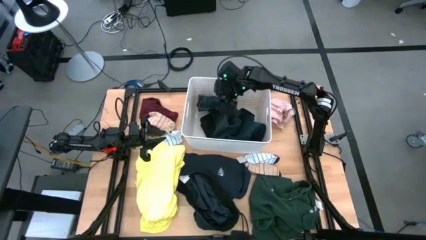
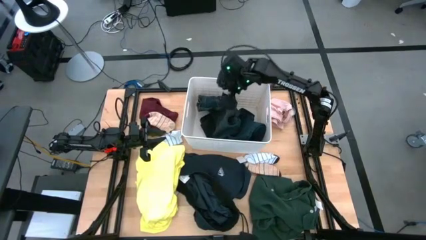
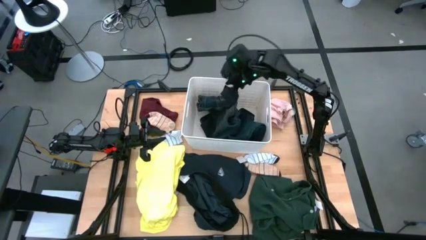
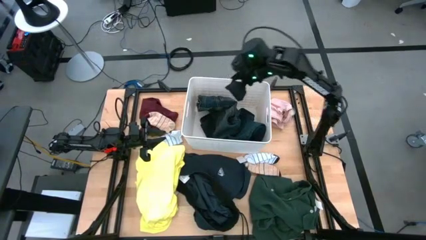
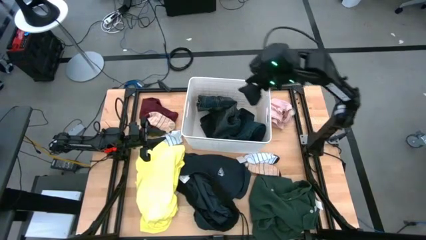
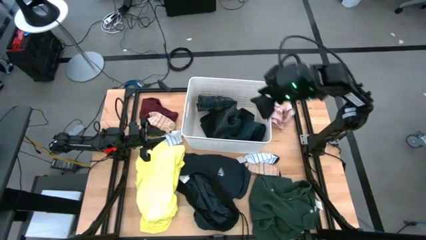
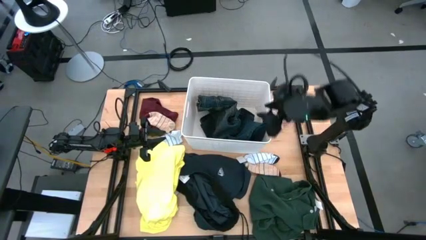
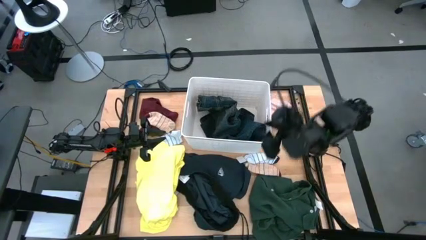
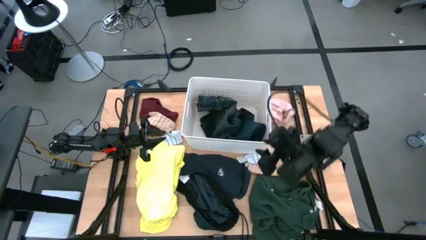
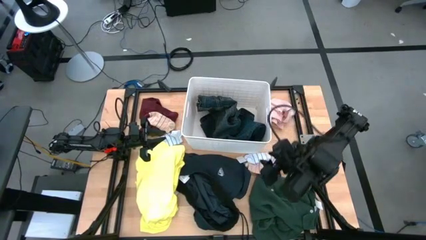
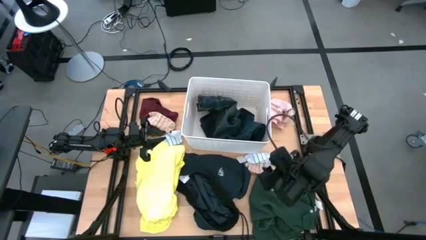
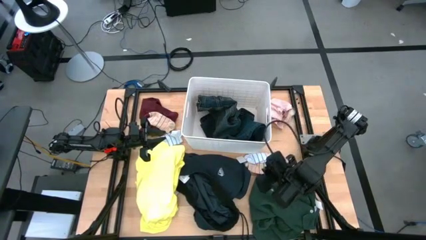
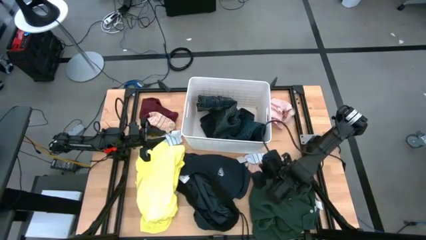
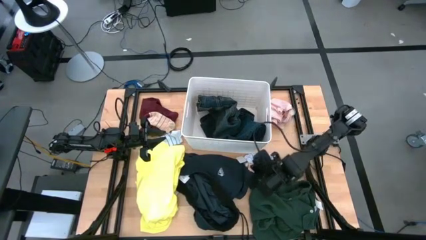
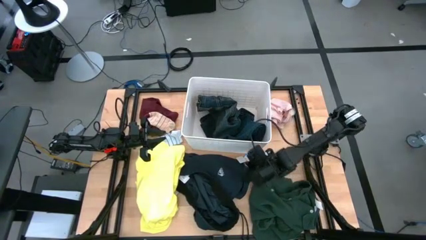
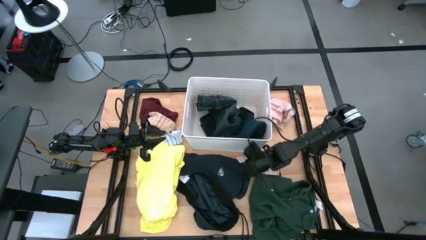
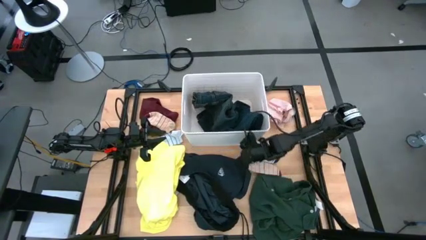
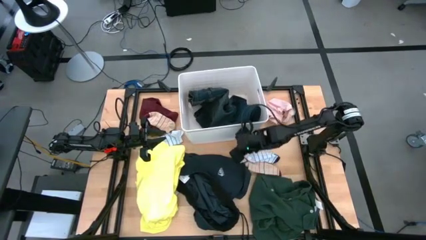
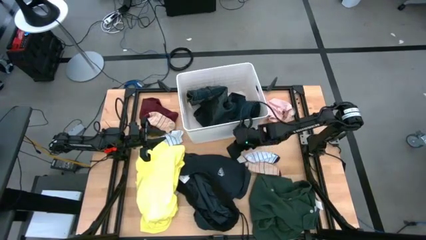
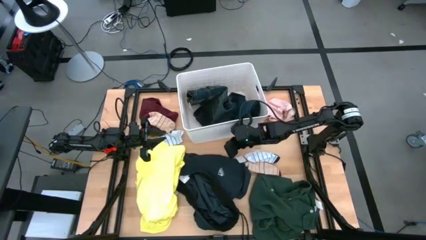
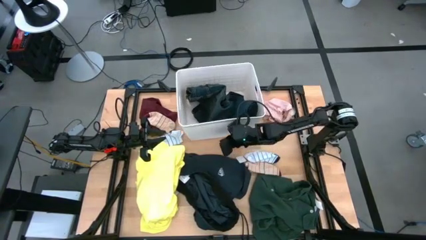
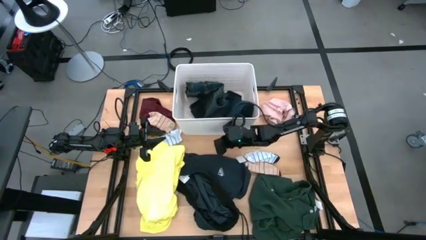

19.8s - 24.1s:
Task: Sort clothes
Adjust the white bin

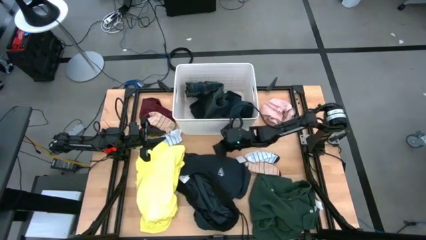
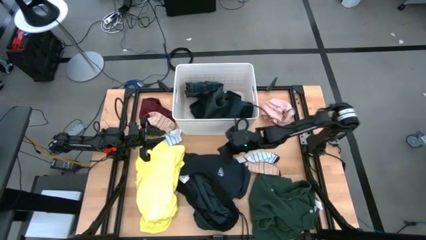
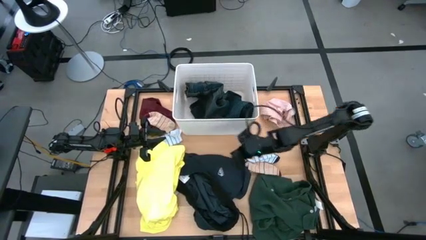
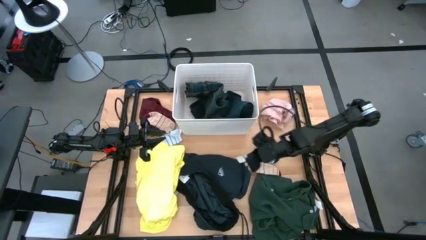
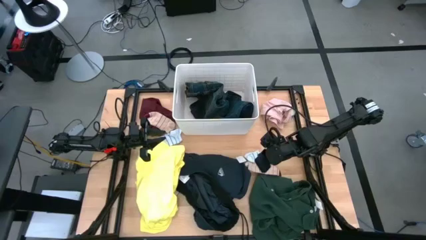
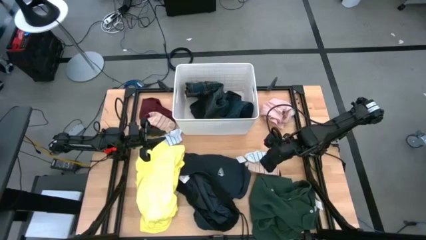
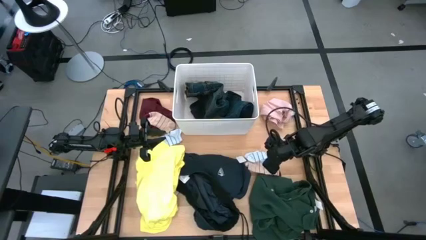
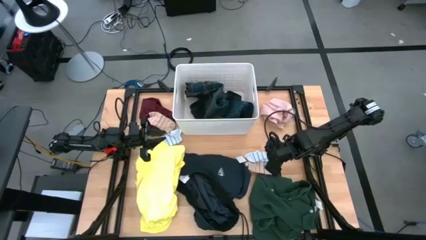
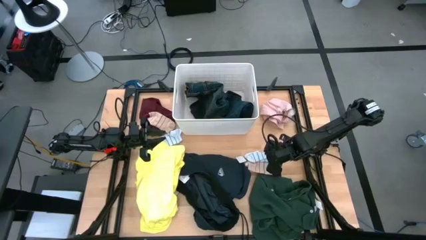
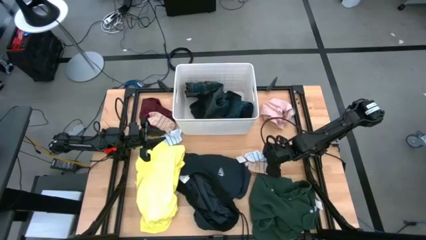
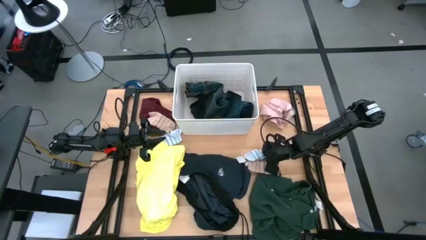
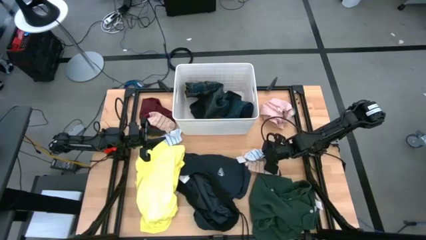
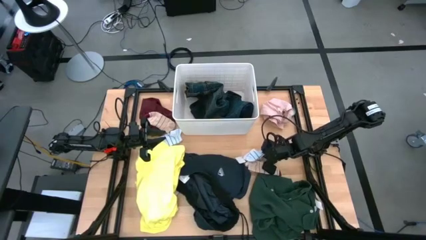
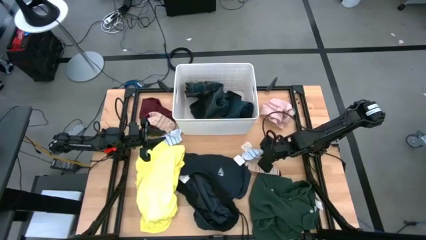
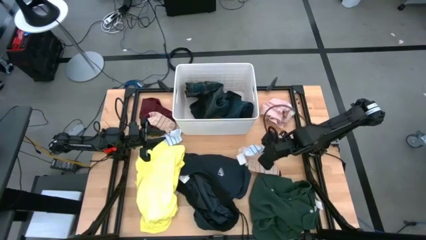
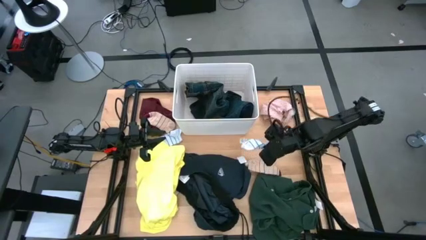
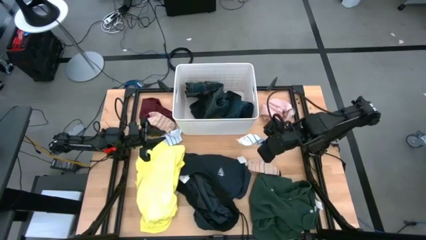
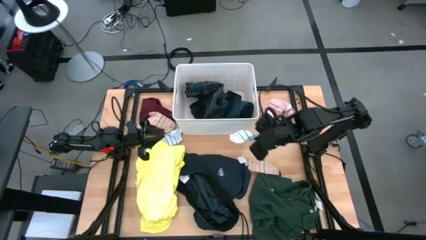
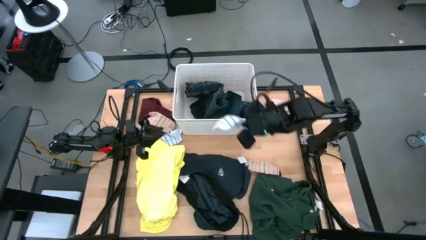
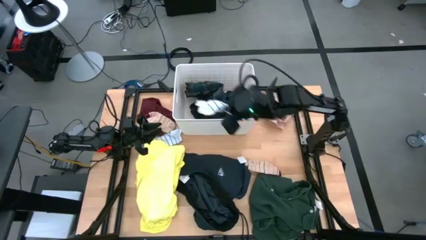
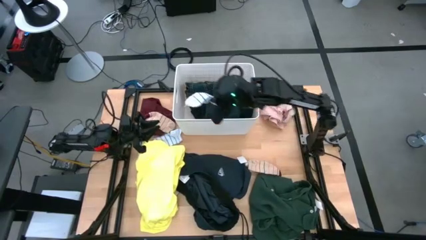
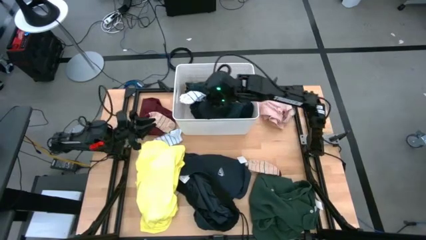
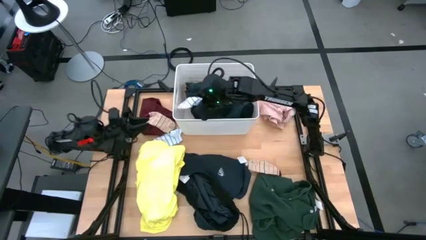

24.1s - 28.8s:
Put the right white striped sock into the white bin

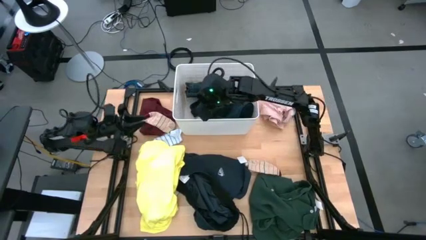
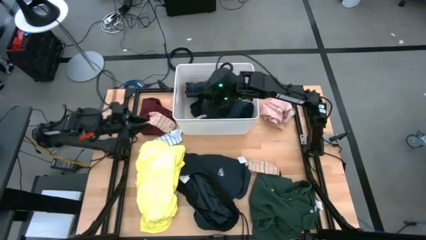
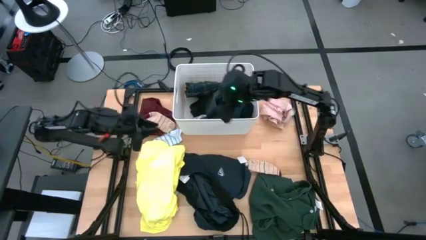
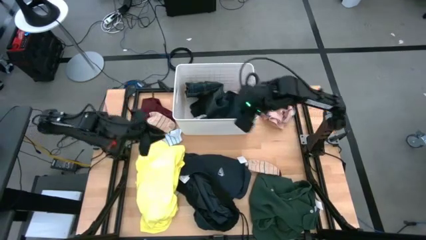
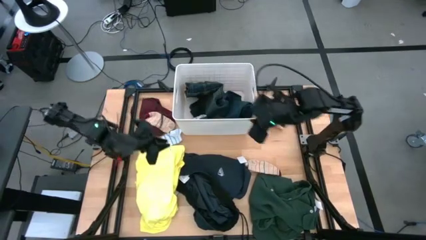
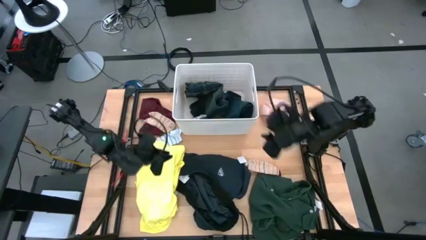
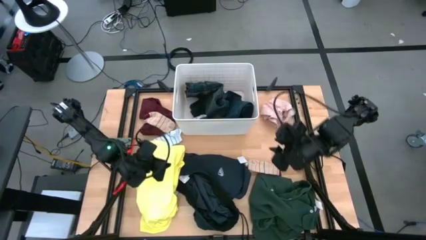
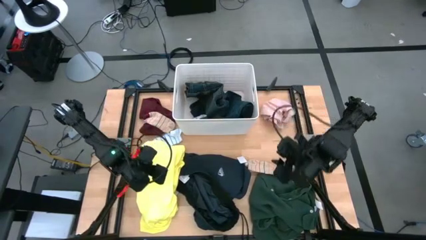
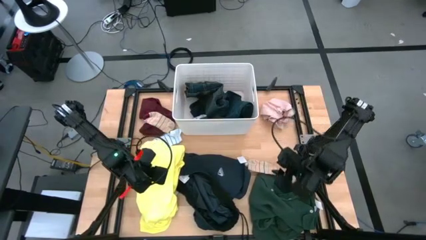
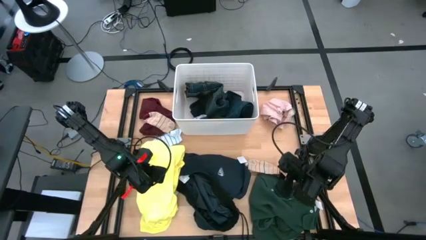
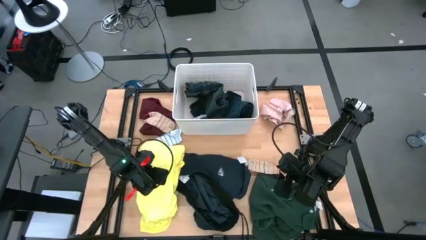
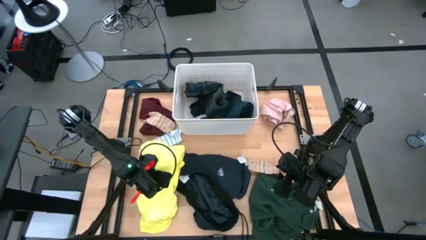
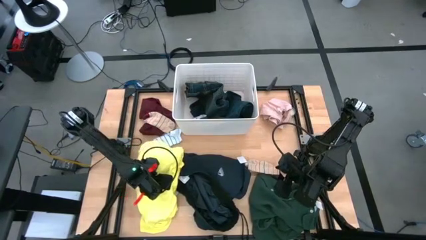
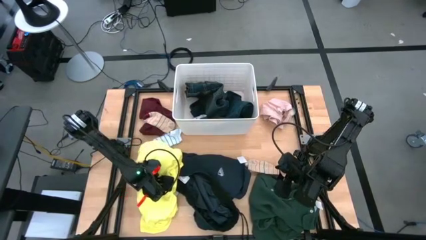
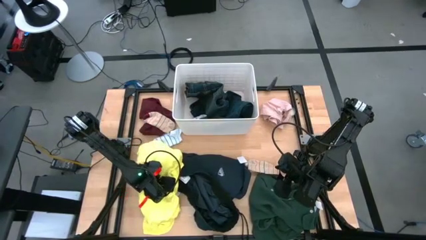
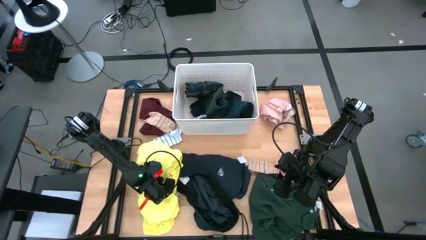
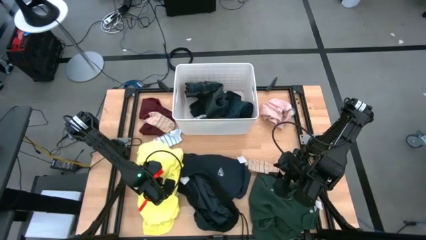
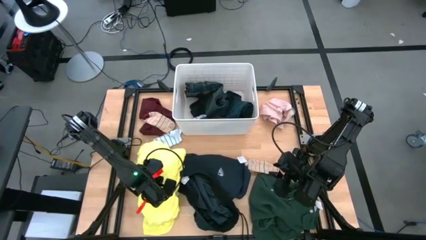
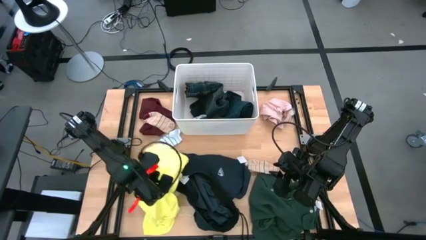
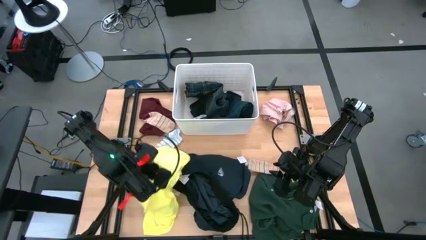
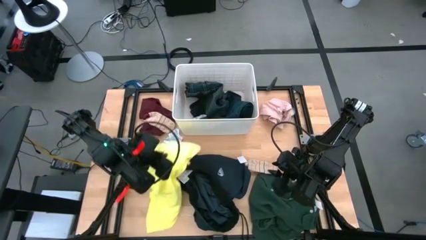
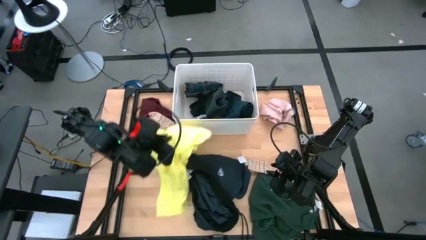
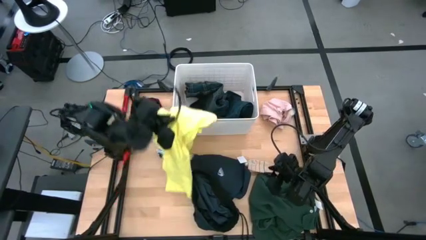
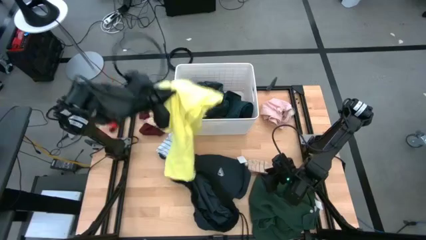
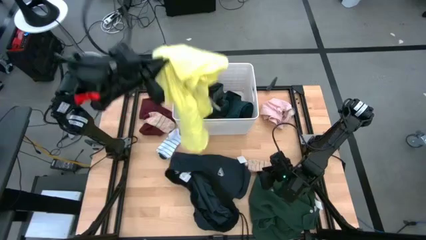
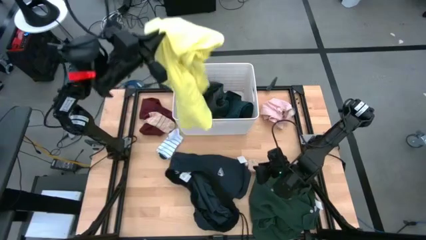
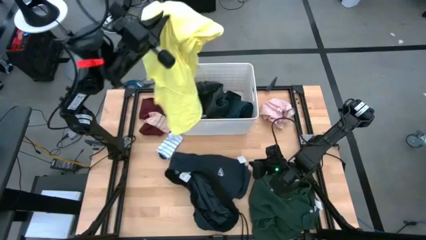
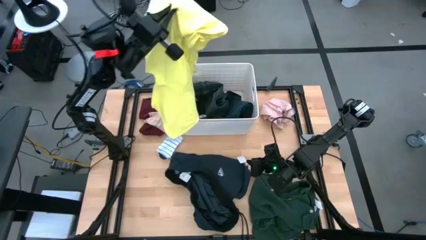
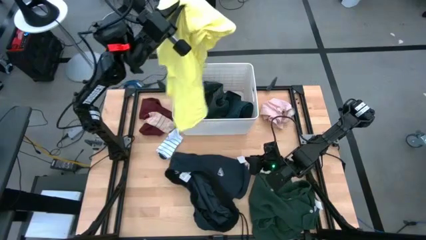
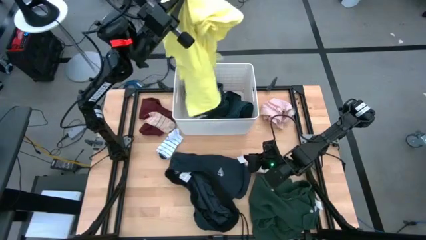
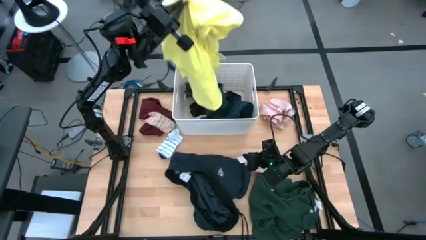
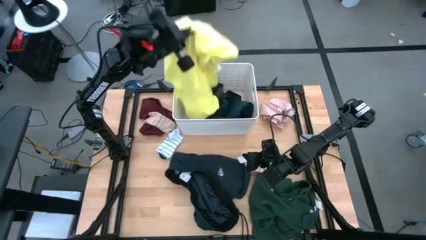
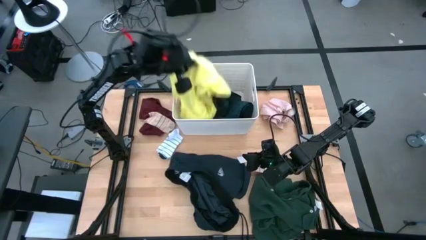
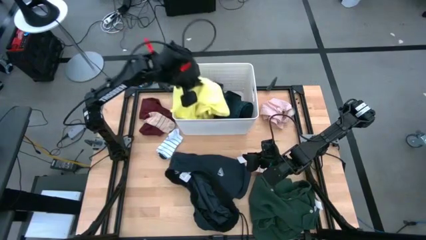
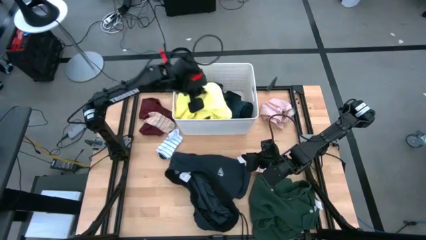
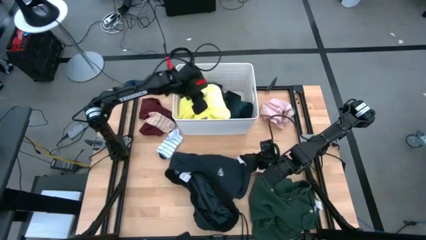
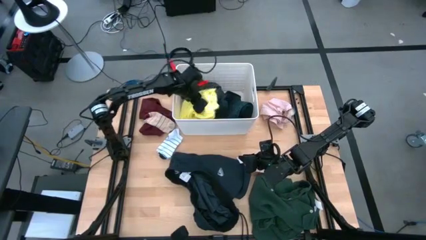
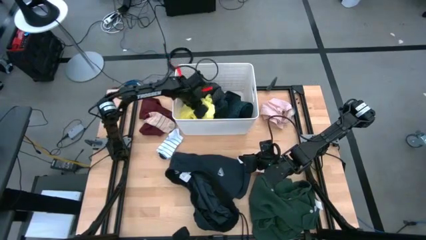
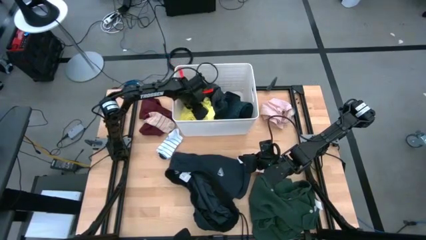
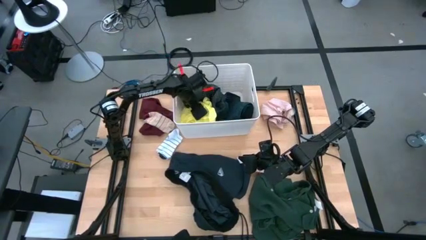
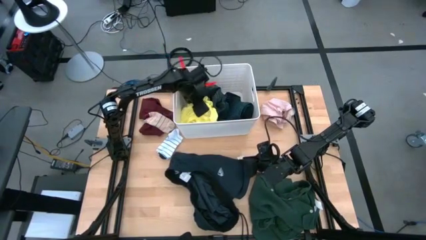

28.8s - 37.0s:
Put the yellow shirt into the white bin
